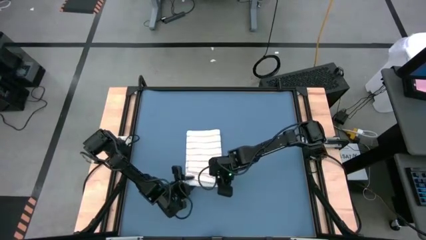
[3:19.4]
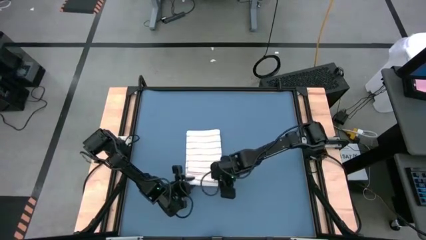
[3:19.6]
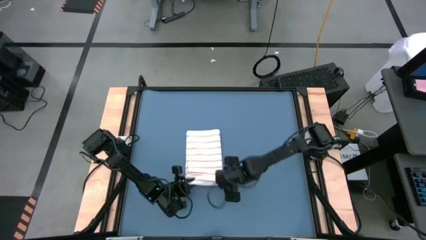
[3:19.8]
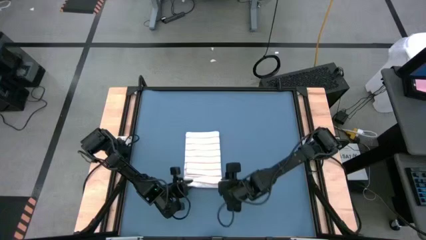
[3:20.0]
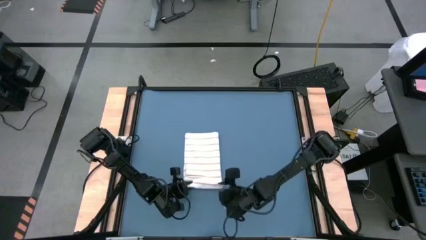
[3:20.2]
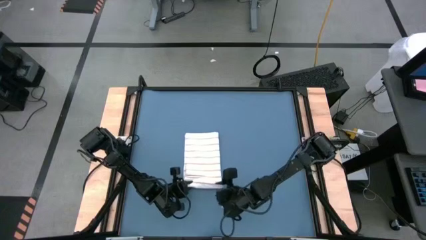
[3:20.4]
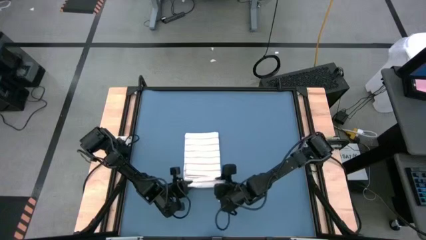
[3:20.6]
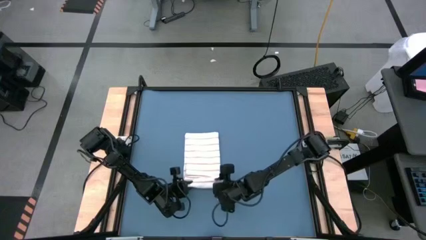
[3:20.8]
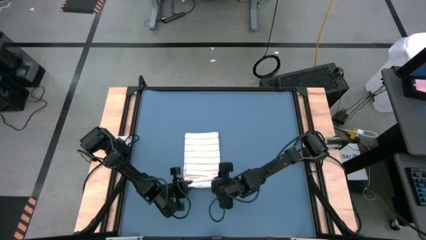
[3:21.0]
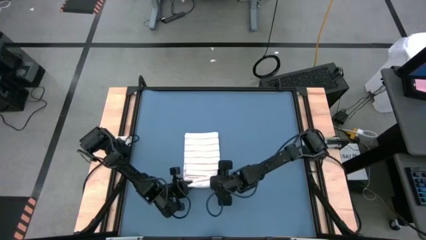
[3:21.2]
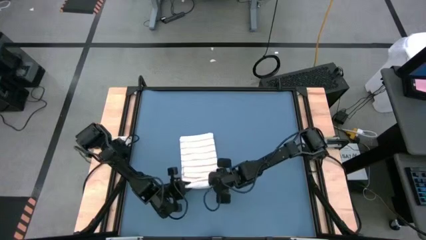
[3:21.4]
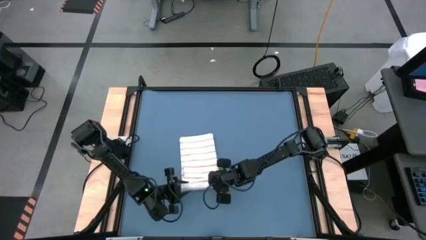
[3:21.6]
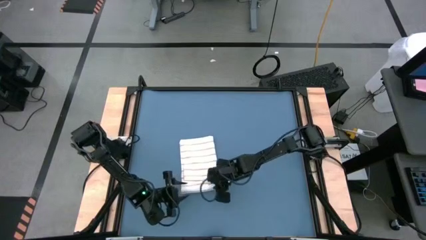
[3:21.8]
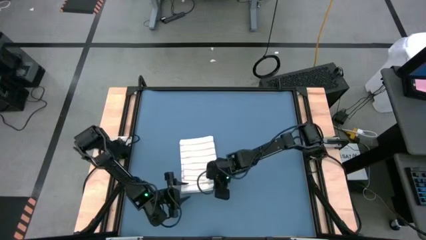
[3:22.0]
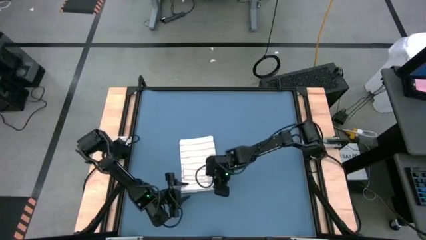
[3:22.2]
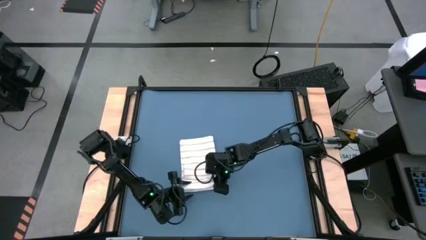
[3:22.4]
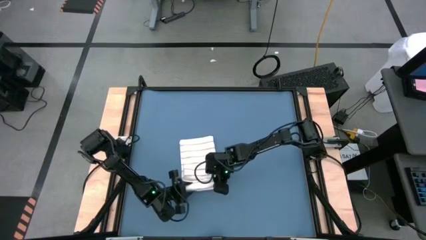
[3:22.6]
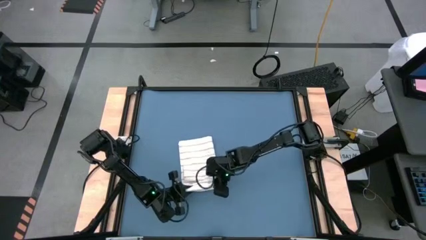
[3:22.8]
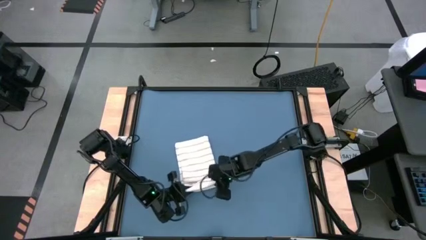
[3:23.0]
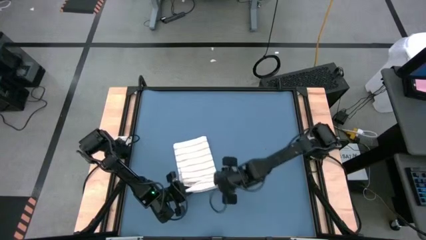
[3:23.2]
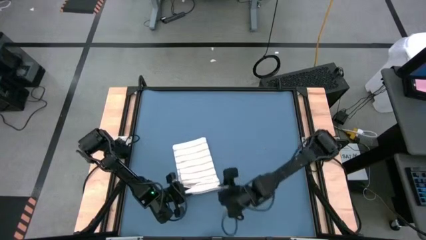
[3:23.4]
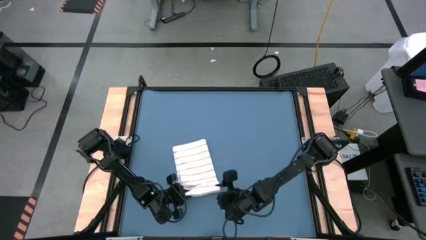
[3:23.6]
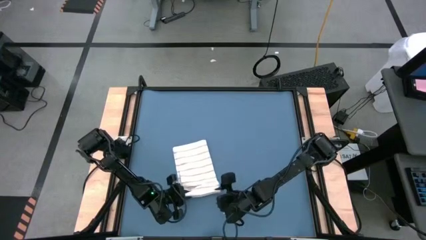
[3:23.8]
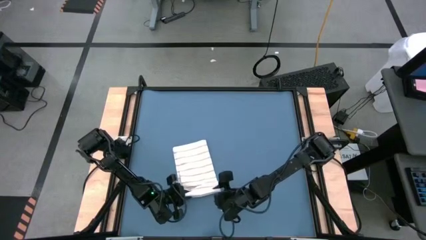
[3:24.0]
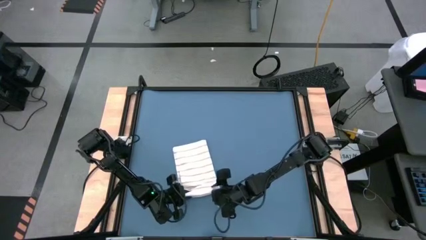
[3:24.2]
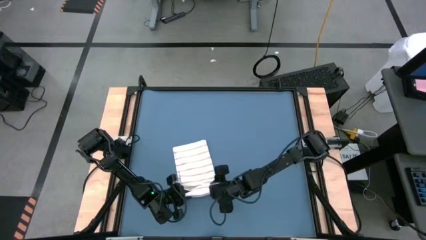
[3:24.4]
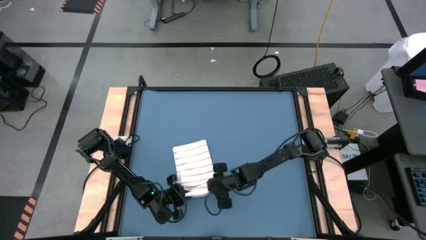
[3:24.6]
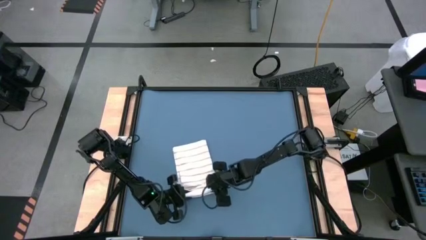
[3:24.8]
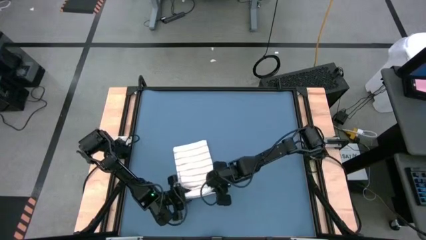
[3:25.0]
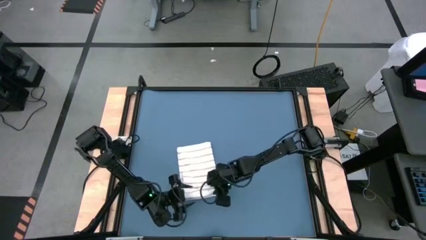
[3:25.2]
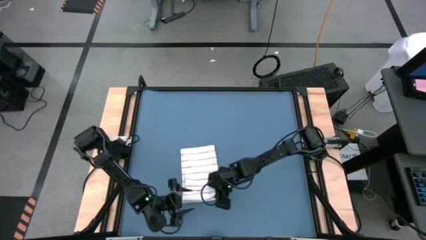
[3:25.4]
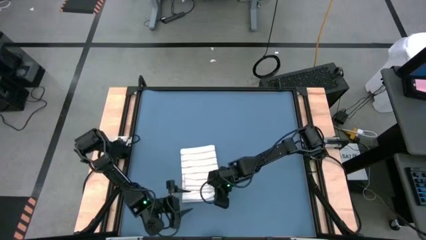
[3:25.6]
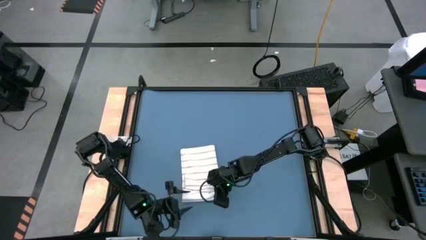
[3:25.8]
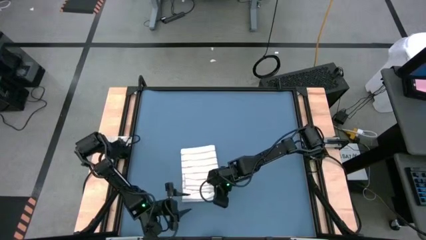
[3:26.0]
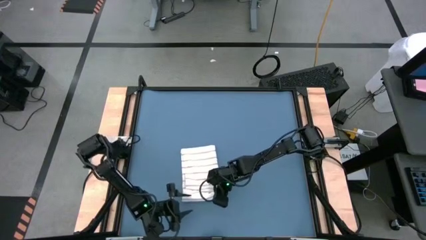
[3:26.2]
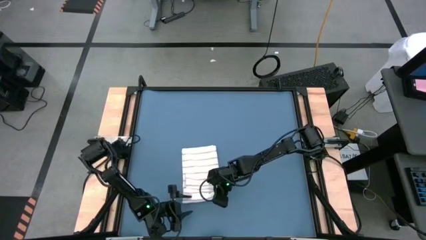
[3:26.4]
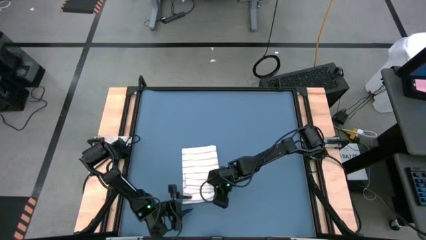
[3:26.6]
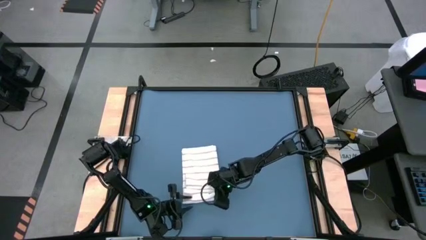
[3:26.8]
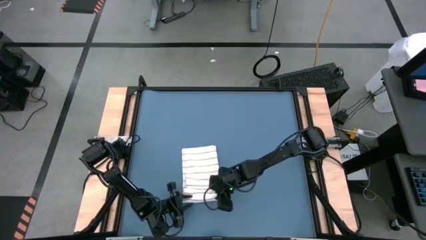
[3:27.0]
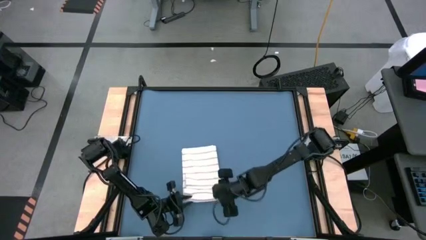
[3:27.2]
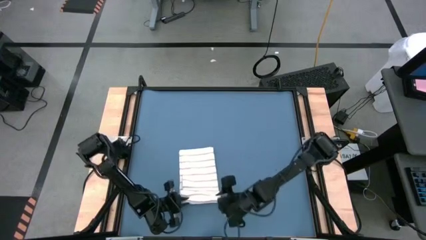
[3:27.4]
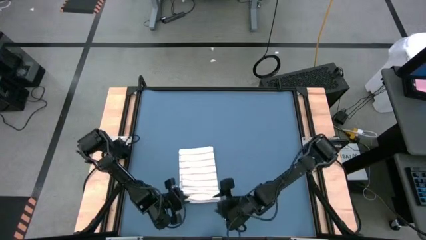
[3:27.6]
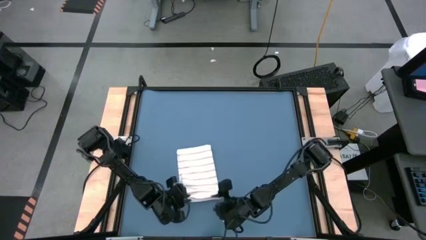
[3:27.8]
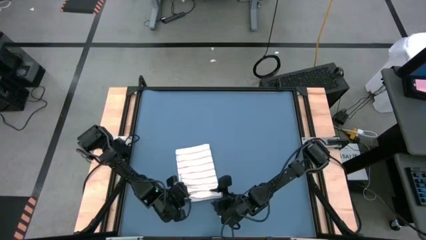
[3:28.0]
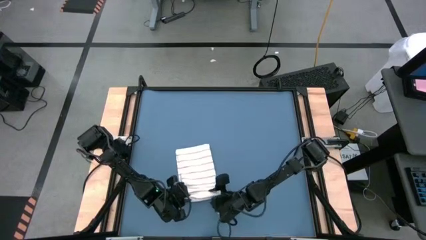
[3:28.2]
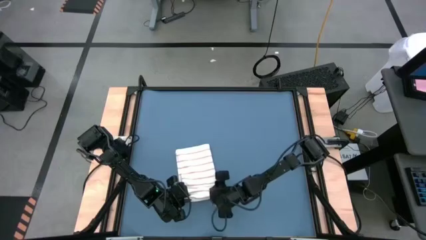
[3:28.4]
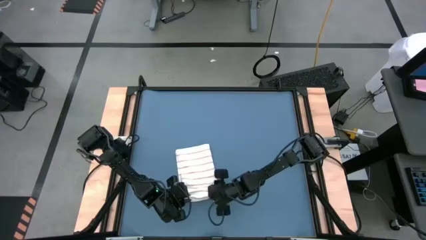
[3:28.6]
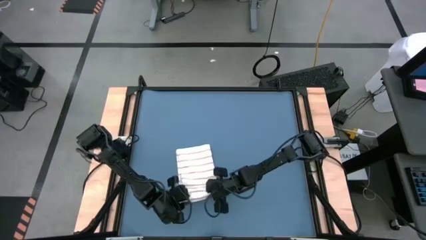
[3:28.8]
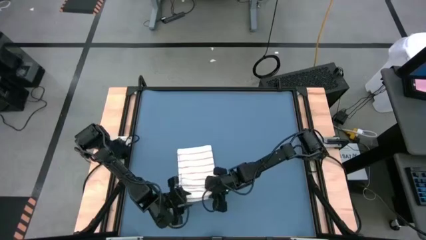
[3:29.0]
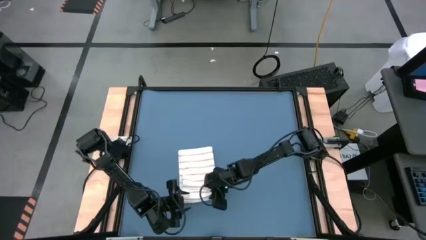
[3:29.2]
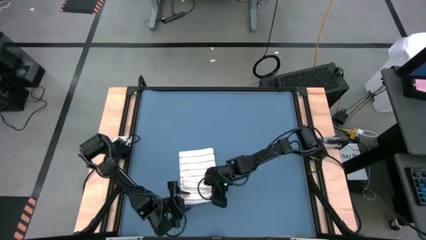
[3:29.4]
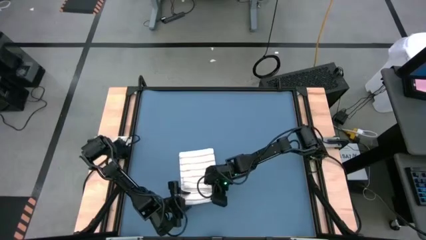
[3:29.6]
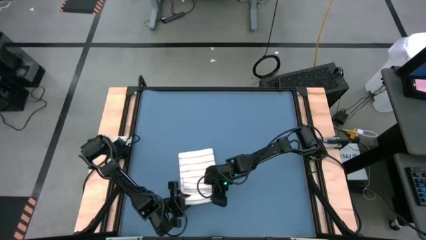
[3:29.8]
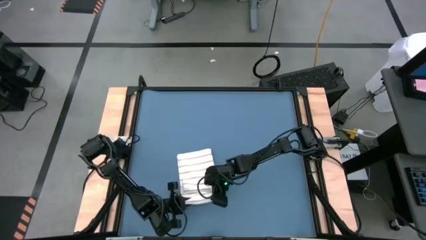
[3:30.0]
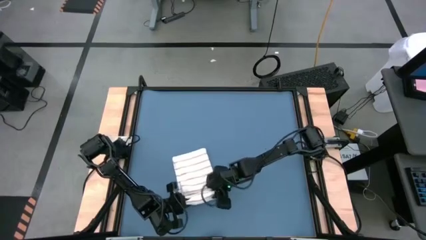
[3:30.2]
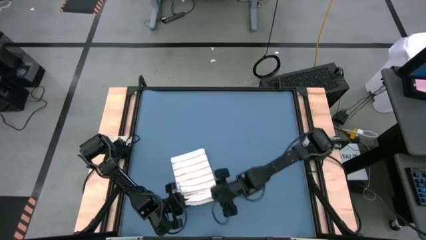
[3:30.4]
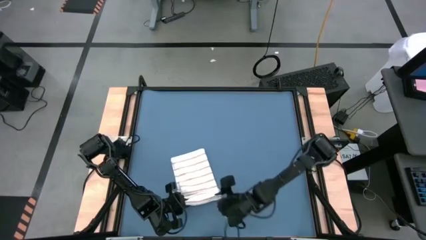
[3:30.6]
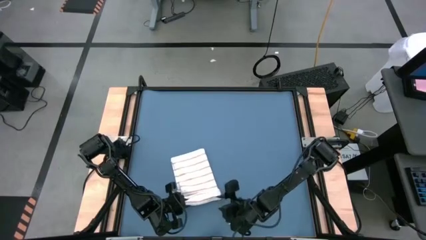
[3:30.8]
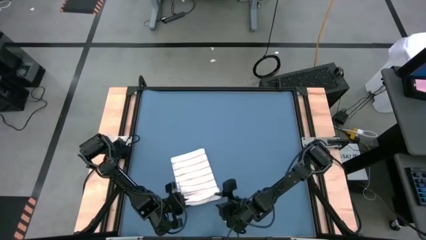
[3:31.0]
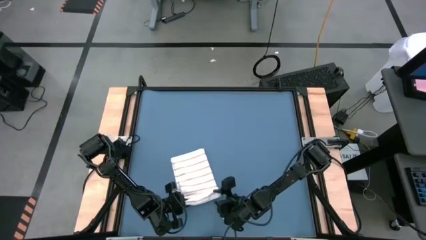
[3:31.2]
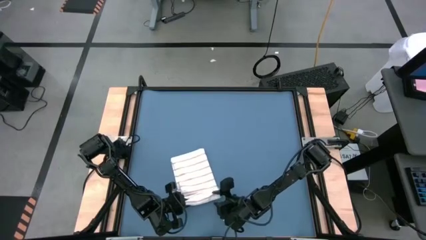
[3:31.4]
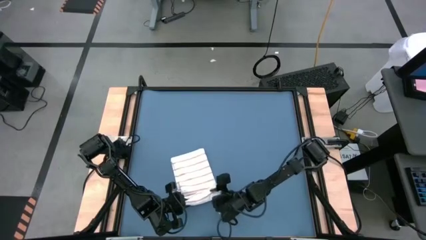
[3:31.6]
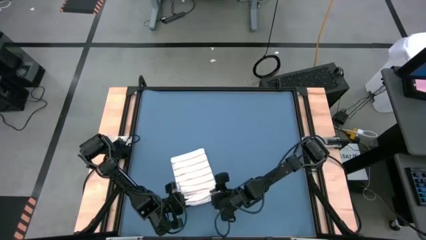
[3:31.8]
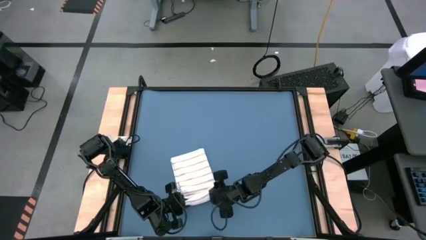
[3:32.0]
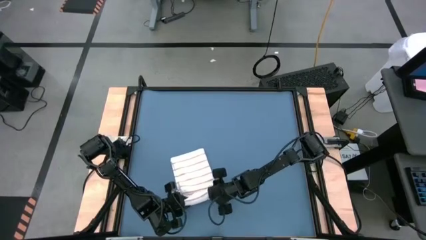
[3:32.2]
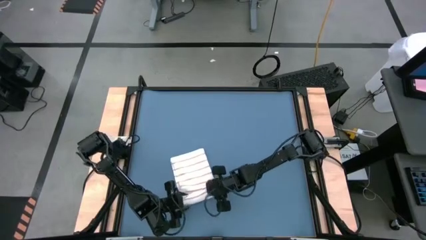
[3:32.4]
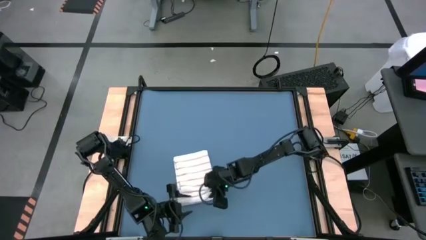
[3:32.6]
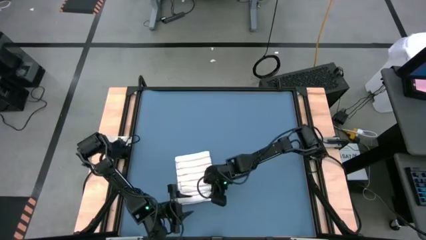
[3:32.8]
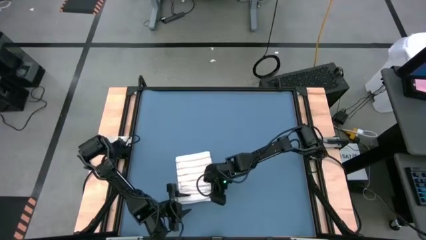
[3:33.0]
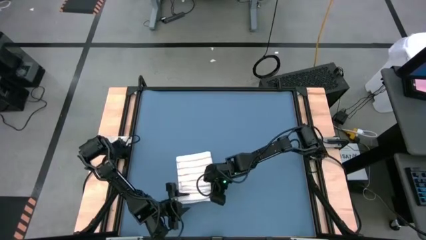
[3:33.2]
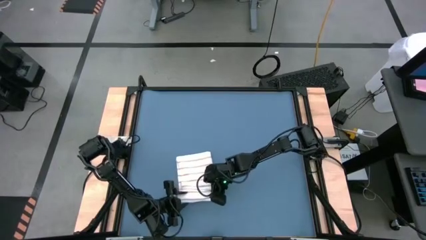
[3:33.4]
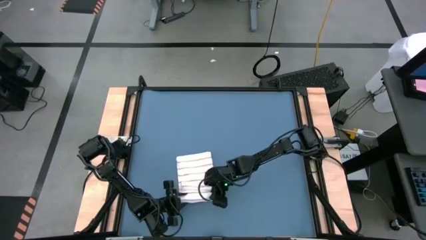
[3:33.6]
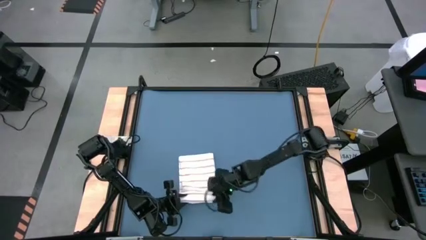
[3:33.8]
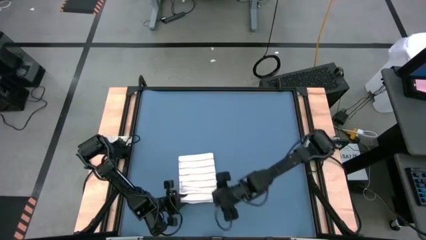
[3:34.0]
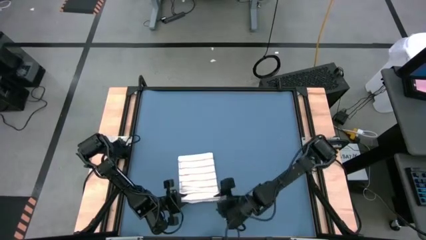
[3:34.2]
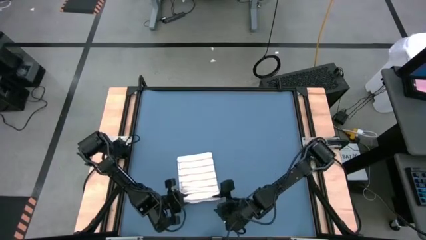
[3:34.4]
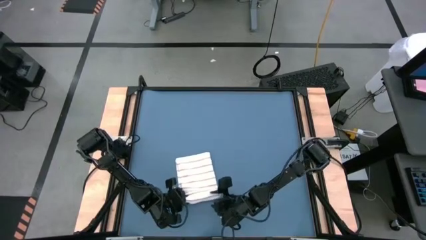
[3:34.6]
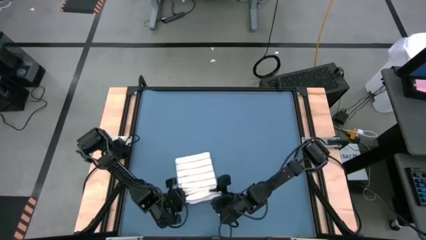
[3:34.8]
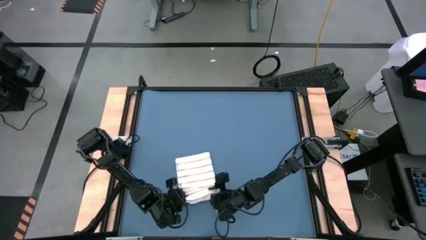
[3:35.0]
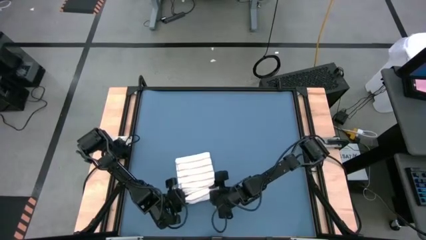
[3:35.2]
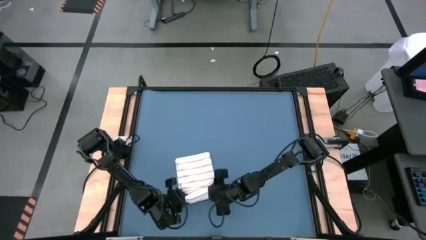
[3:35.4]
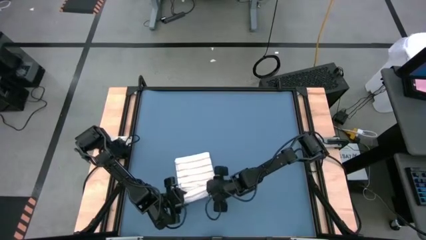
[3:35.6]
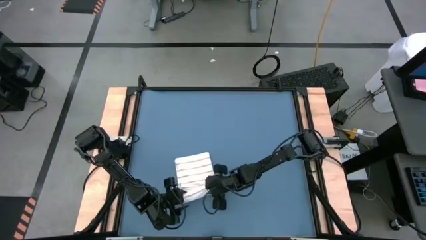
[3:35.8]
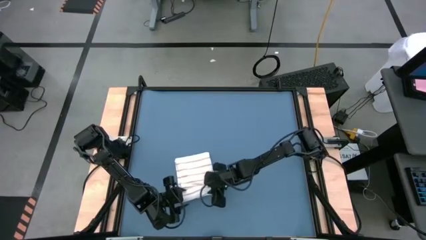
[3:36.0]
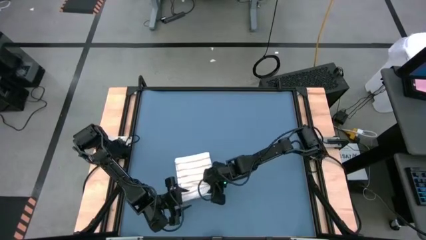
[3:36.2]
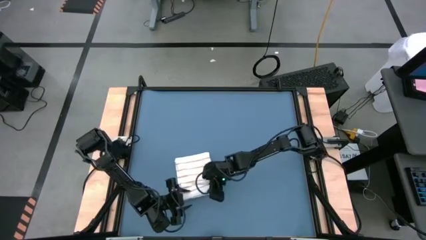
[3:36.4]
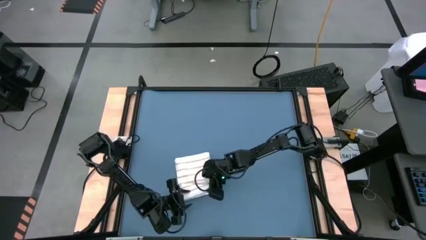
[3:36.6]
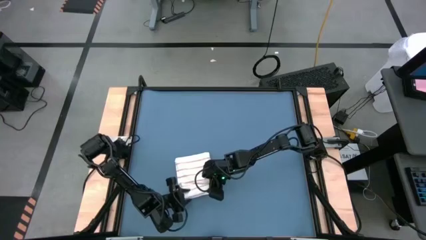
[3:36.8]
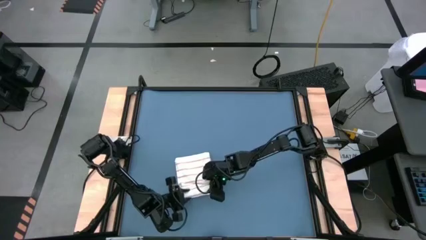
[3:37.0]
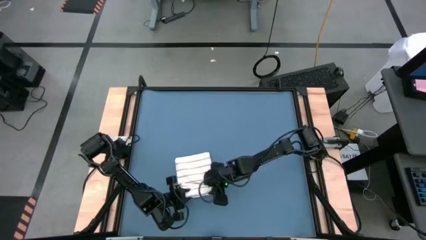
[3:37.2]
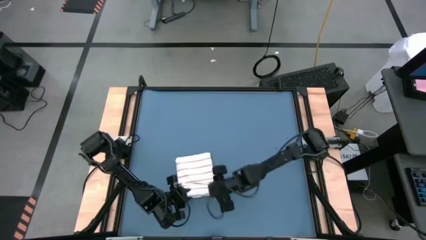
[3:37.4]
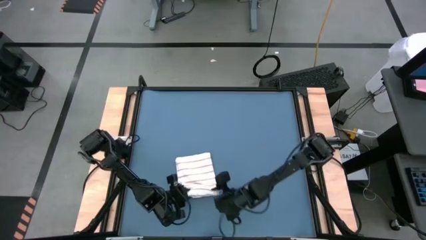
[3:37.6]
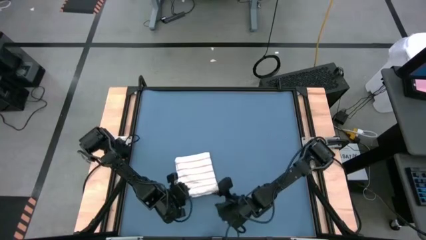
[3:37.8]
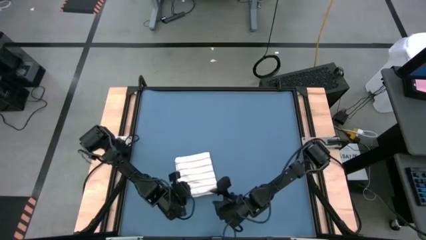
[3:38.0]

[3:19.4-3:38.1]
Task: Roll towel
Roll the white towel
